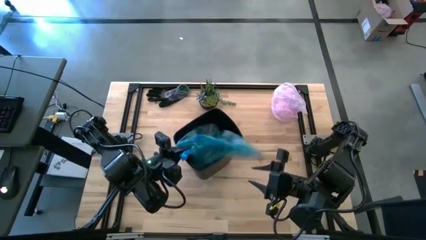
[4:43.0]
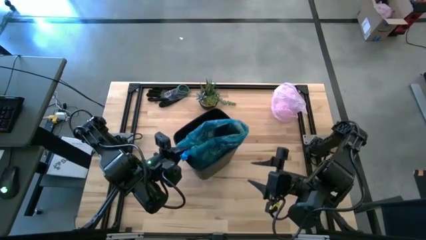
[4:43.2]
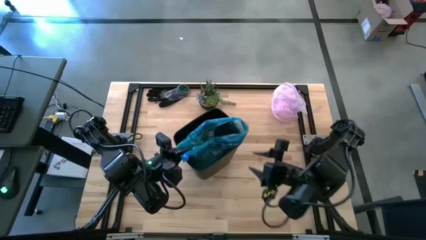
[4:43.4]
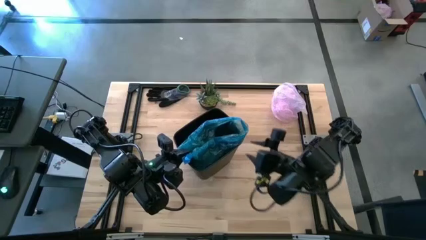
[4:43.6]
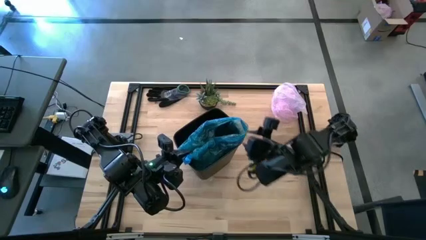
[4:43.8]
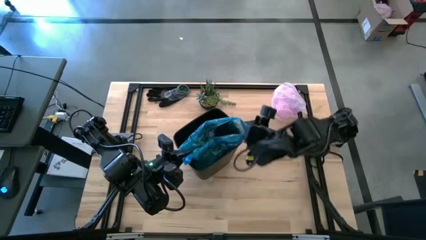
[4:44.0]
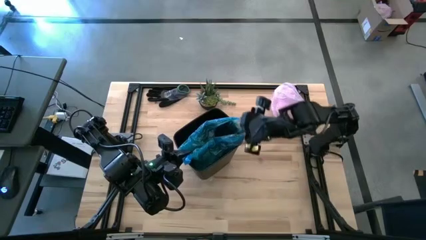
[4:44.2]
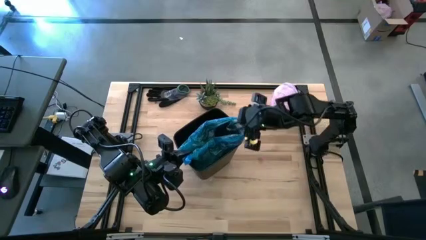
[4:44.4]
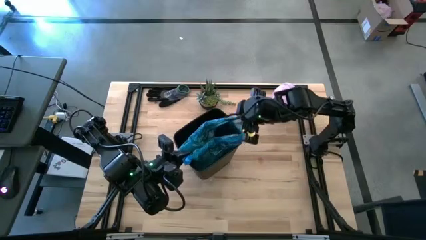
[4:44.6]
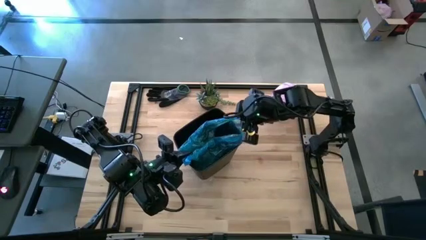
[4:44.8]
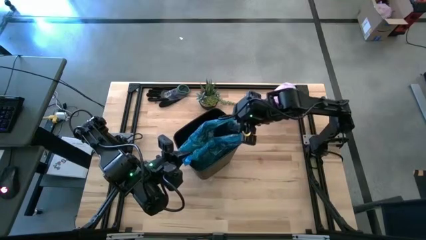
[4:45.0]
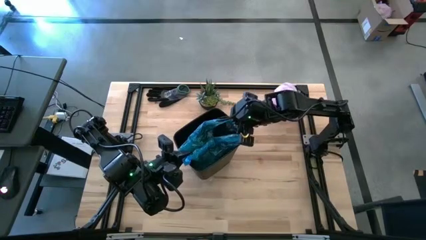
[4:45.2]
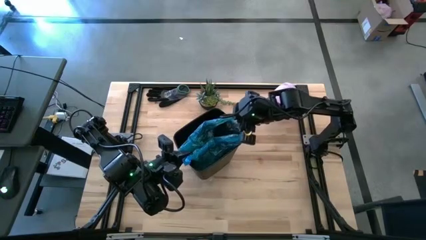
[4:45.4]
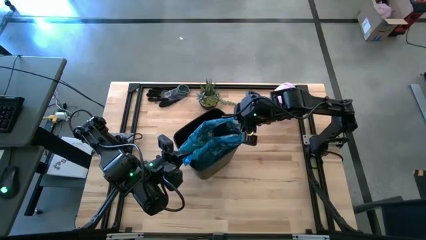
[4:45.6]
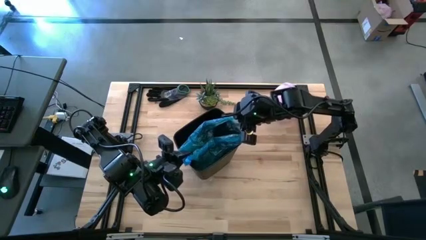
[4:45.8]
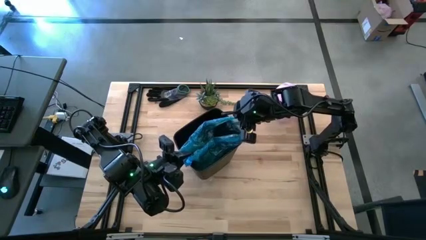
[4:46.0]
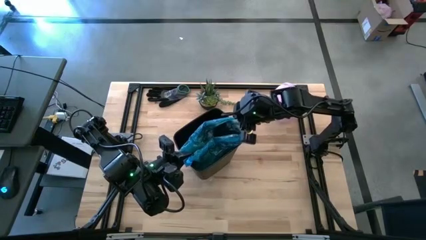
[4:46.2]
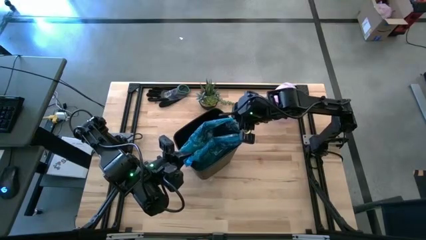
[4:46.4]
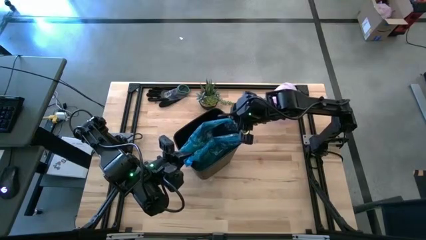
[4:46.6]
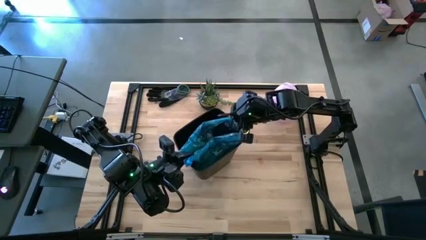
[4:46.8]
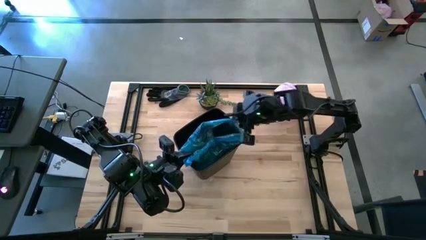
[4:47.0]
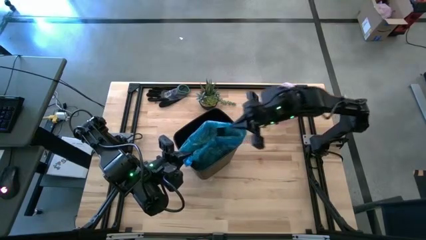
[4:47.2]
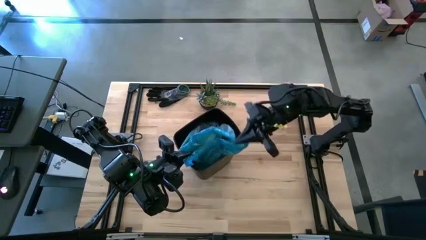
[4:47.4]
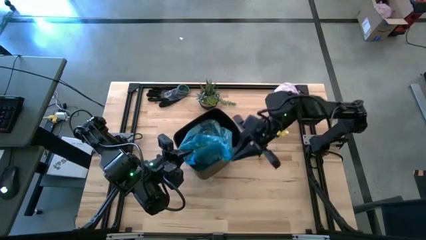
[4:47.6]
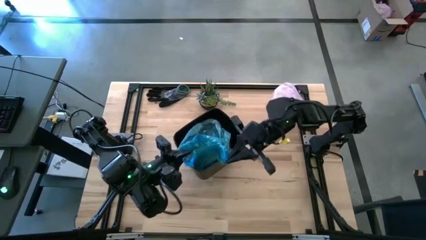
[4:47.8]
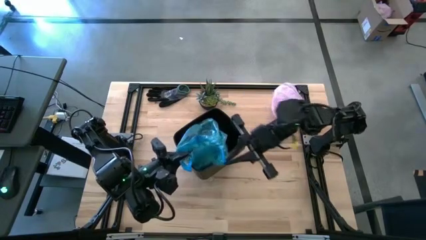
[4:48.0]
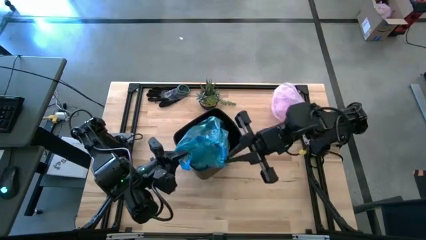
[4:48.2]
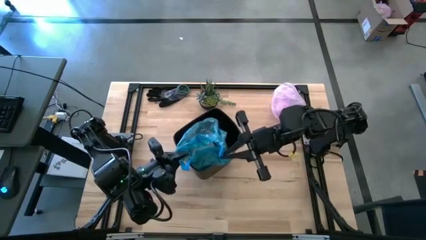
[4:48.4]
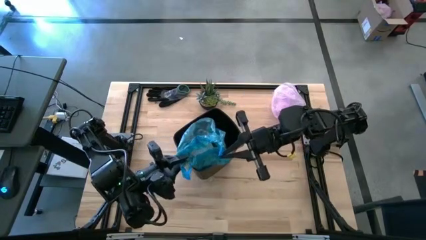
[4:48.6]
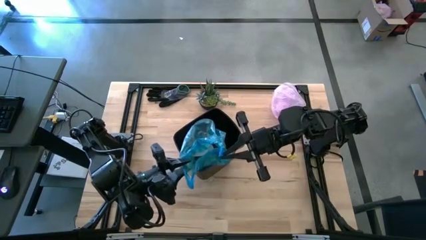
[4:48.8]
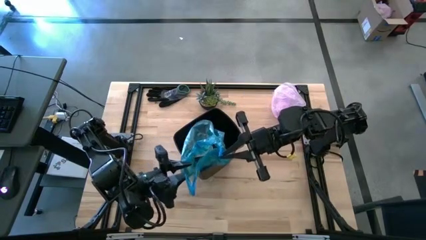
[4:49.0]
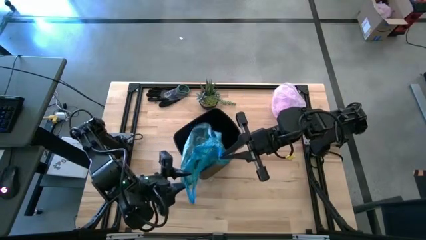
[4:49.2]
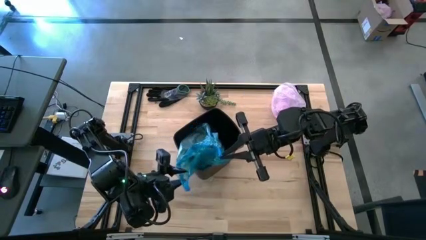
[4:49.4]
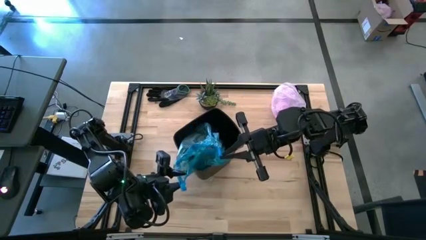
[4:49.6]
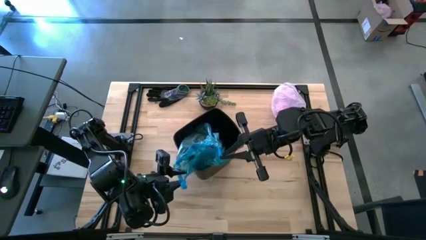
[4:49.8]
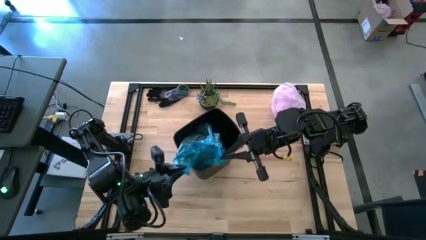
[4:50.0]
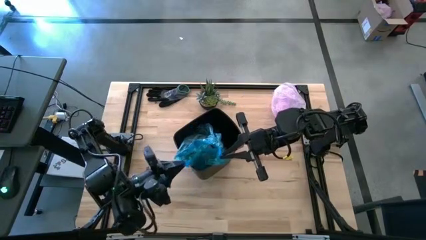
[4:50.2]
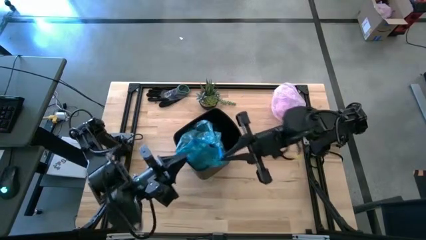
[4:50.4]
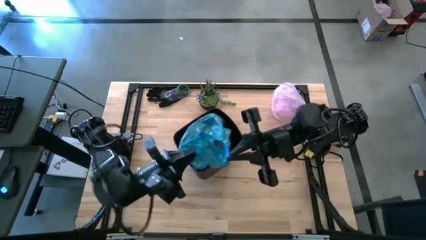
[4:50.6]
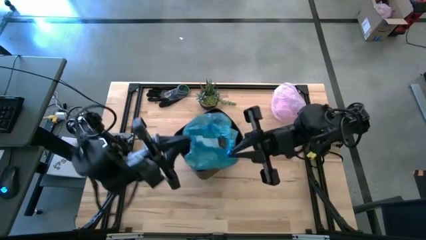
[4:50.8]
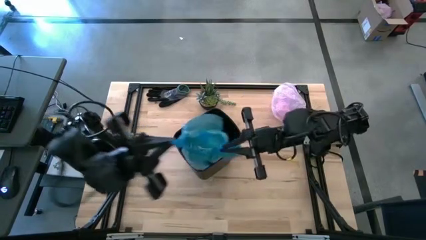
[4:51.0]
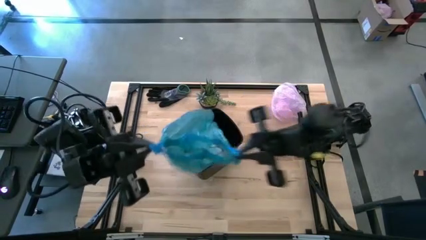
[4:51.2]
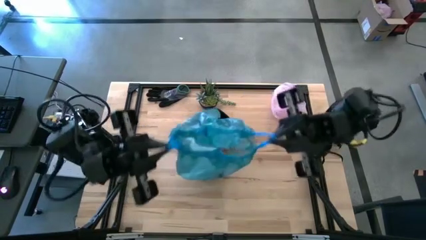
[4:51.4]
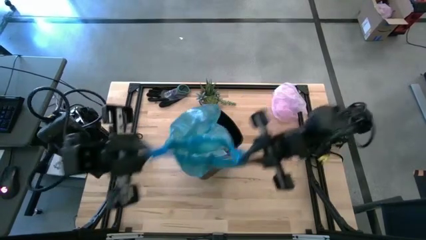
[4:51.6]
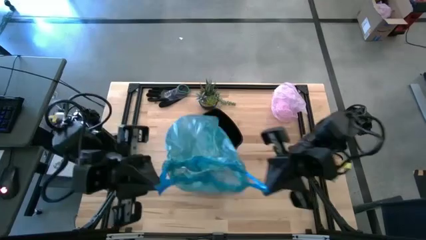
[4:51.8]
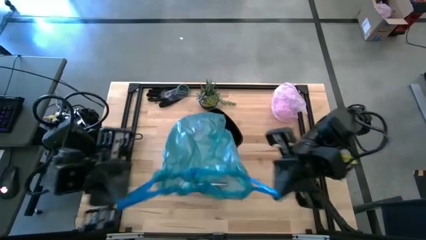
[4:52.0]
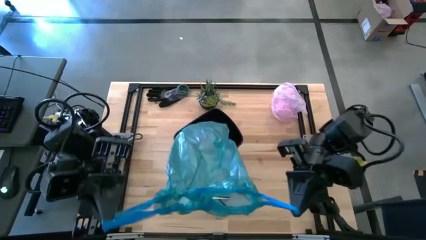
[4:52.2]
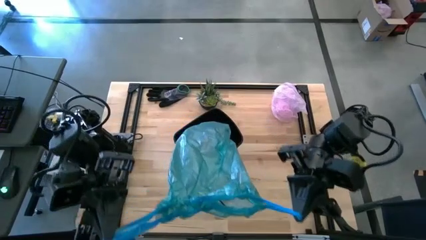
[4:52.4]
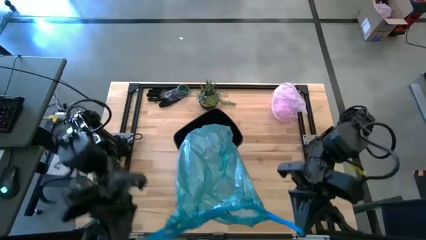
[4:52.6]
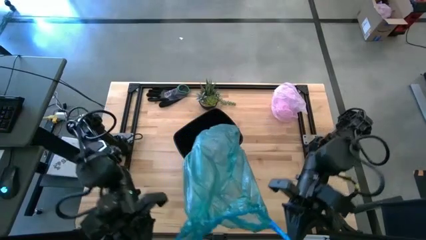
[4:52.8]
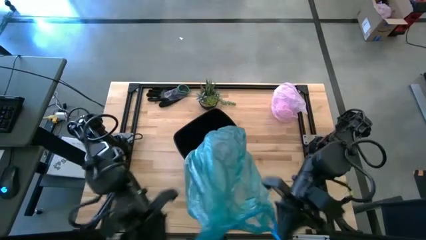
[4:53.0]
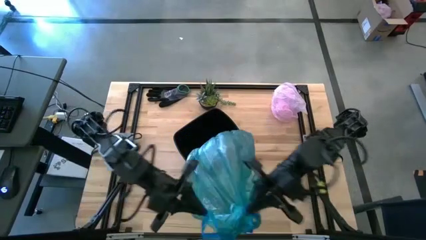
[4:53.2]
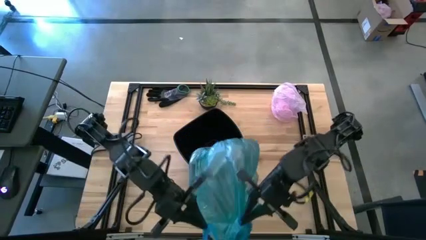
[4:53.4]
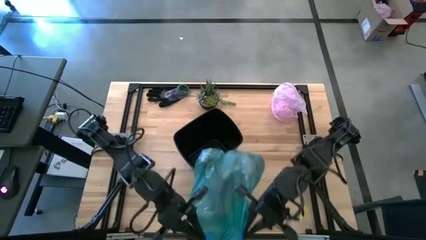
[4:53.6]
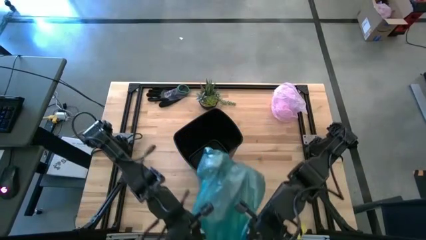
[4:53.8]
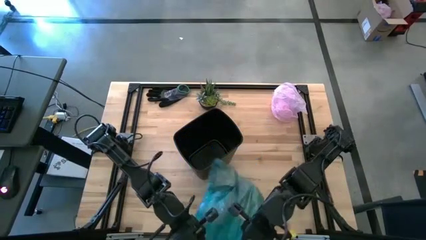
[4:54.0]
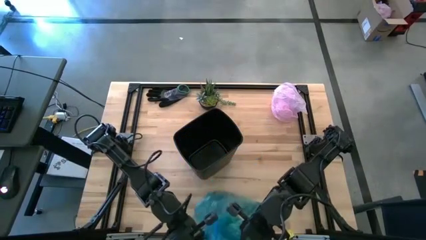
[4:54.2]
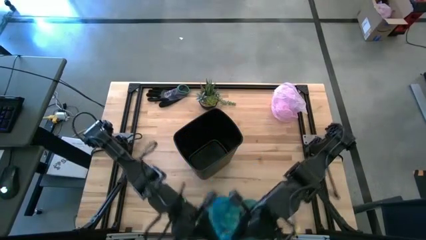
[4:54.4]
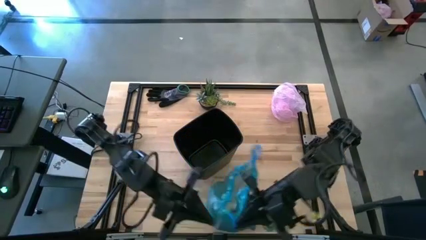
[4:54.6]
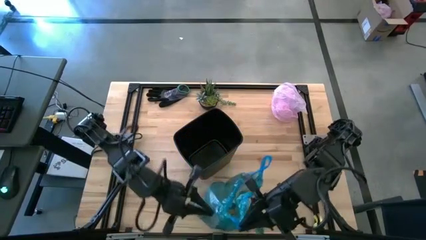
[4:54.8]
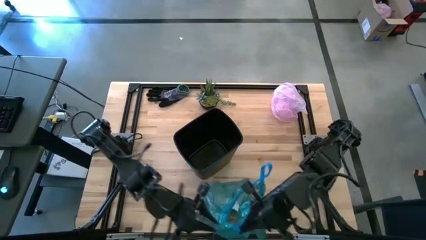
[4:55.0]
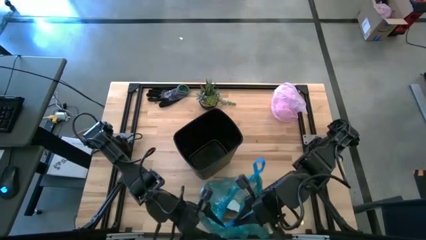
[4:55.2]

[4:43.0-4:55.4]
Task: place trash/remove bag and relplace
Remove the blue trash bag from the trash bin
